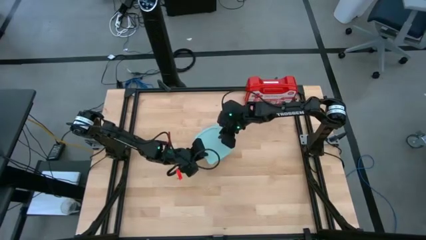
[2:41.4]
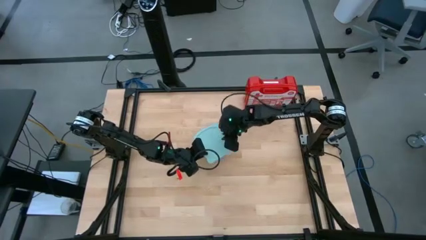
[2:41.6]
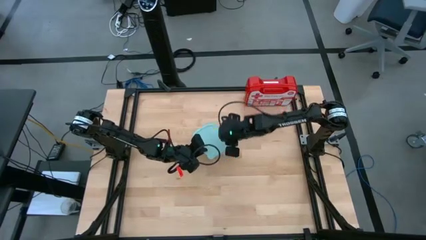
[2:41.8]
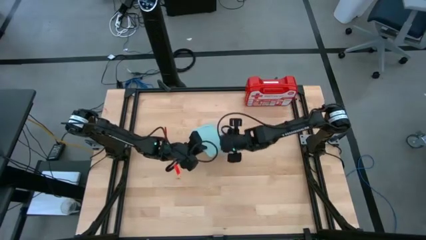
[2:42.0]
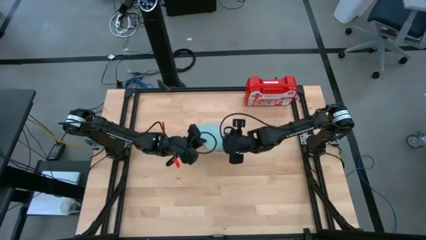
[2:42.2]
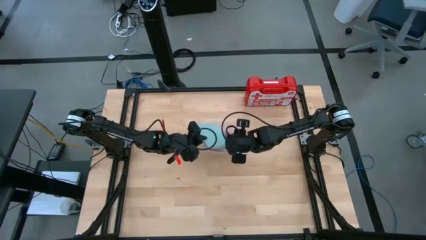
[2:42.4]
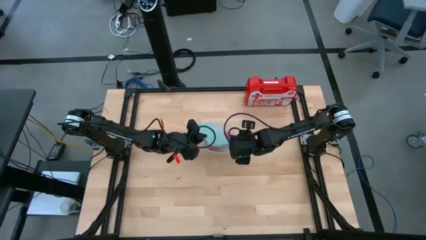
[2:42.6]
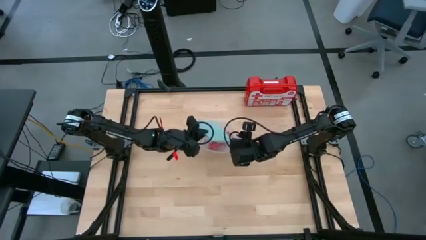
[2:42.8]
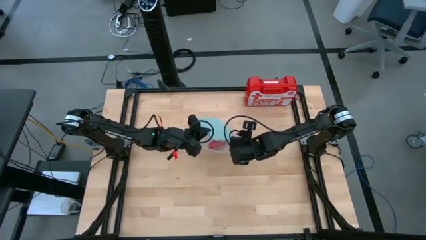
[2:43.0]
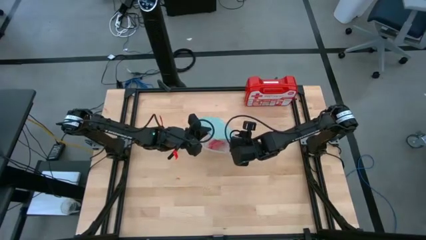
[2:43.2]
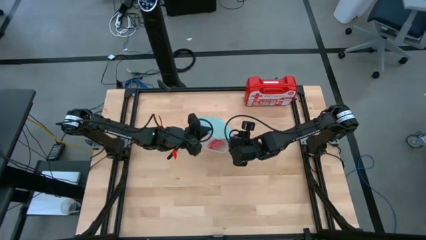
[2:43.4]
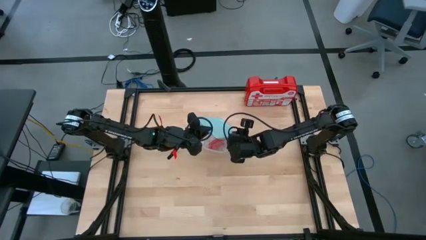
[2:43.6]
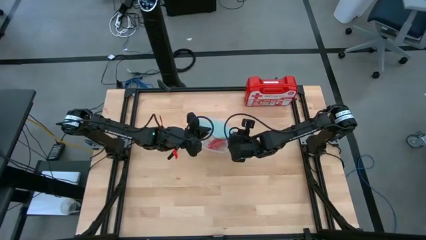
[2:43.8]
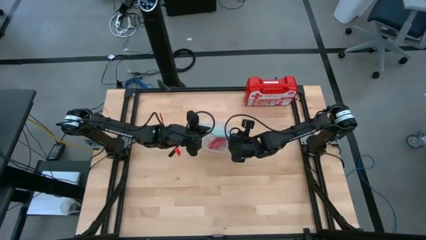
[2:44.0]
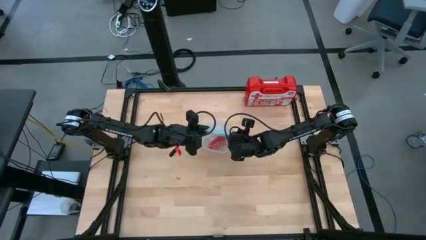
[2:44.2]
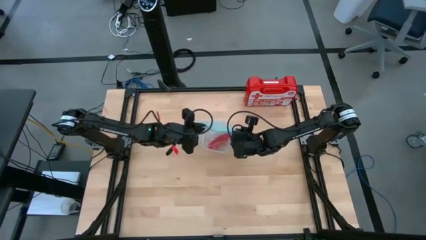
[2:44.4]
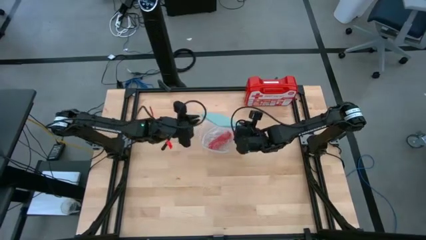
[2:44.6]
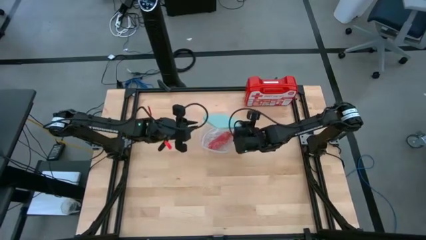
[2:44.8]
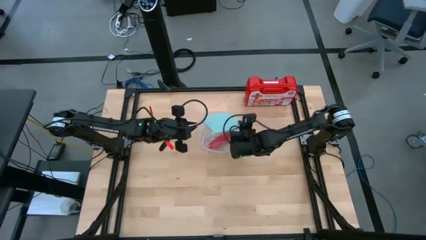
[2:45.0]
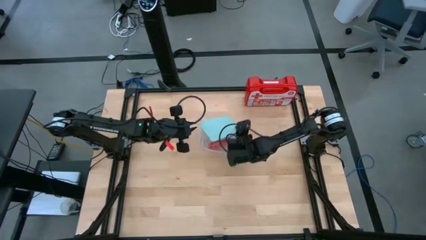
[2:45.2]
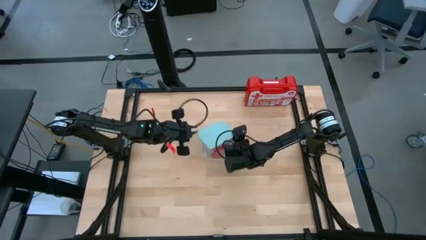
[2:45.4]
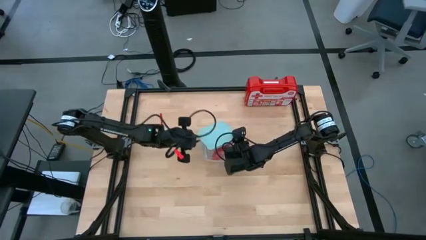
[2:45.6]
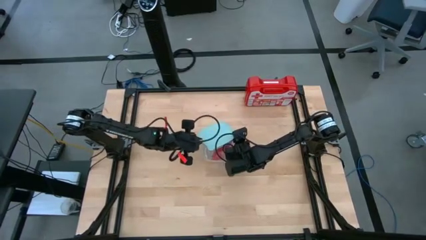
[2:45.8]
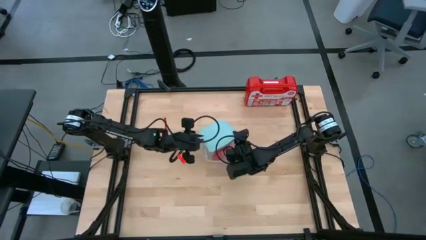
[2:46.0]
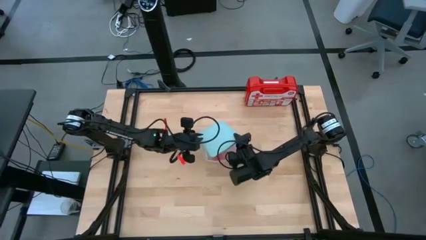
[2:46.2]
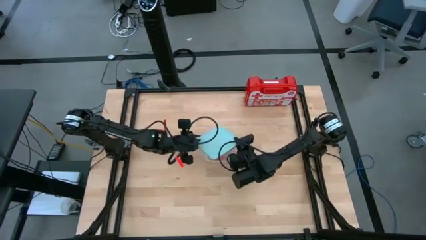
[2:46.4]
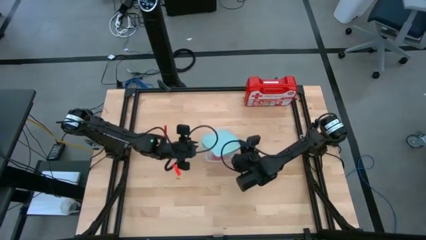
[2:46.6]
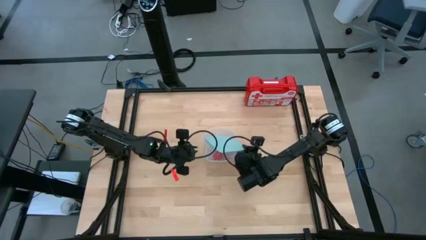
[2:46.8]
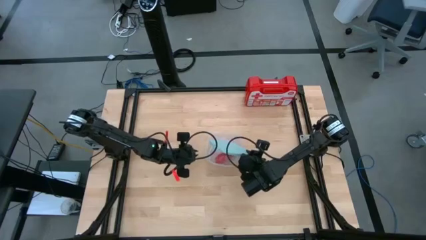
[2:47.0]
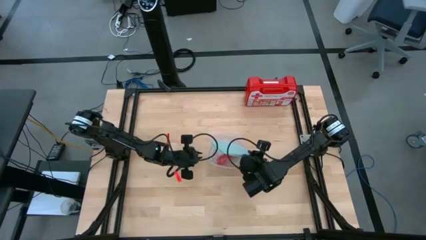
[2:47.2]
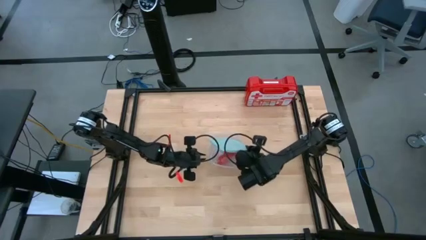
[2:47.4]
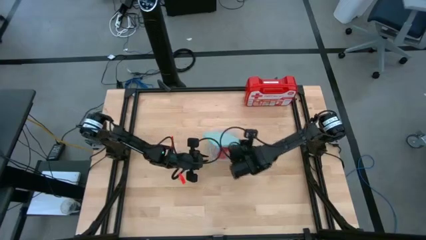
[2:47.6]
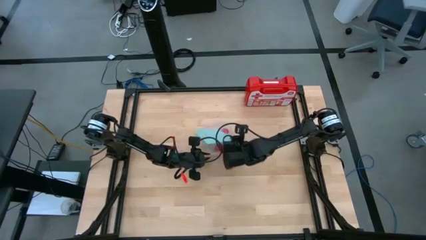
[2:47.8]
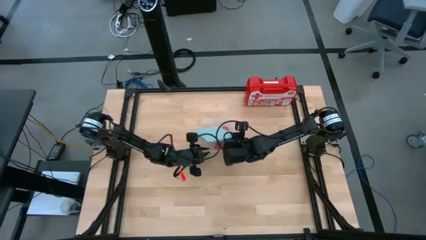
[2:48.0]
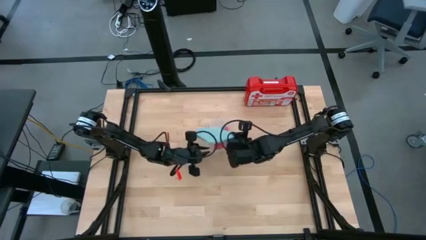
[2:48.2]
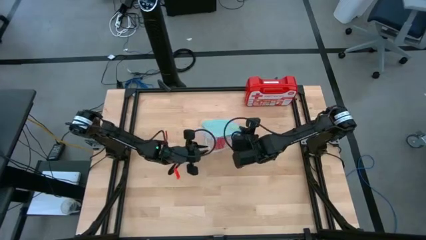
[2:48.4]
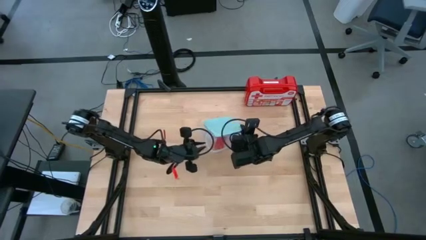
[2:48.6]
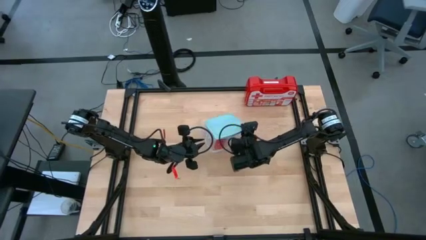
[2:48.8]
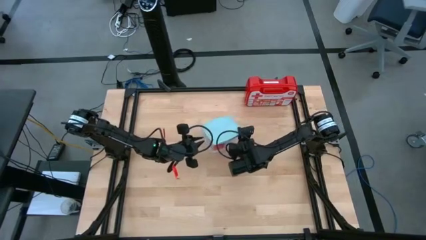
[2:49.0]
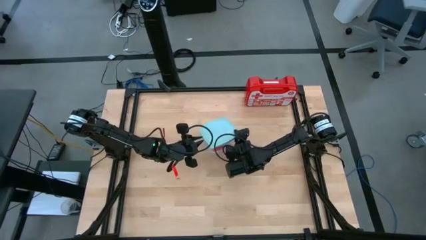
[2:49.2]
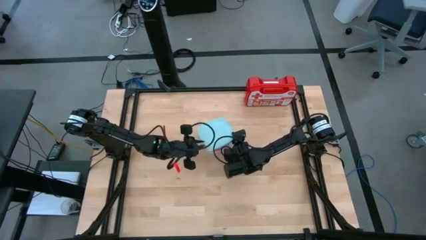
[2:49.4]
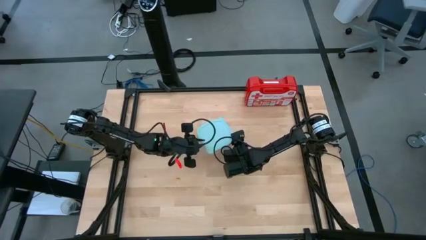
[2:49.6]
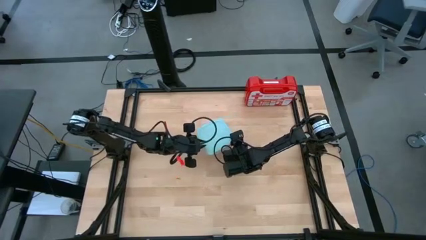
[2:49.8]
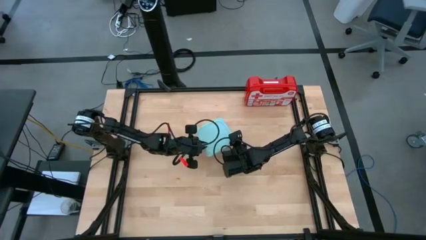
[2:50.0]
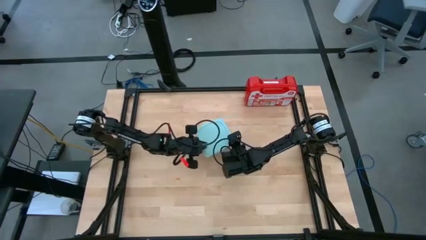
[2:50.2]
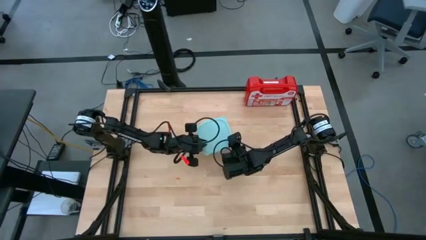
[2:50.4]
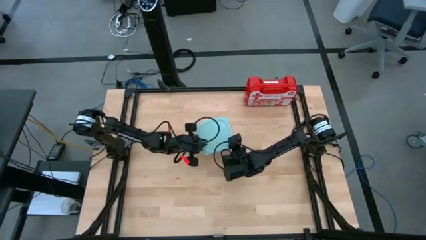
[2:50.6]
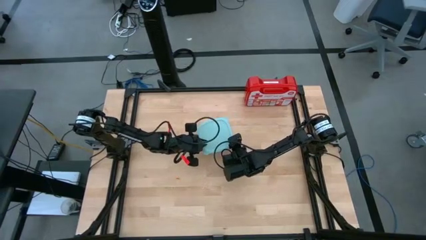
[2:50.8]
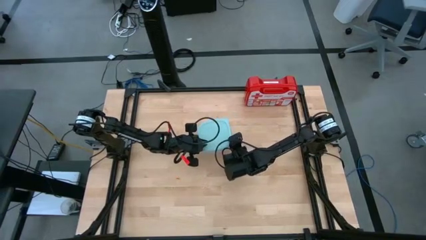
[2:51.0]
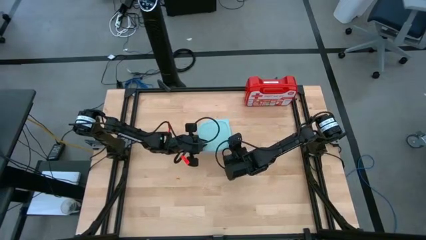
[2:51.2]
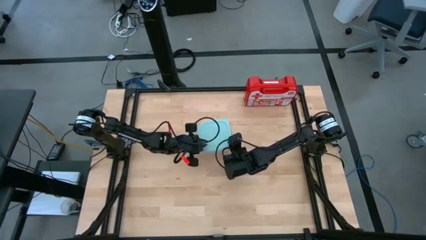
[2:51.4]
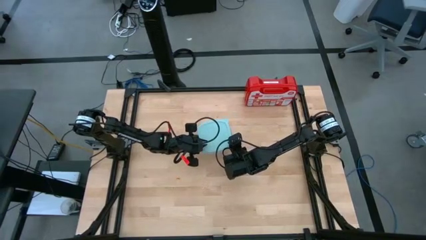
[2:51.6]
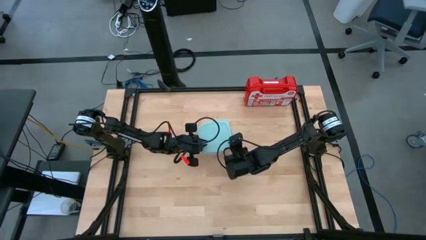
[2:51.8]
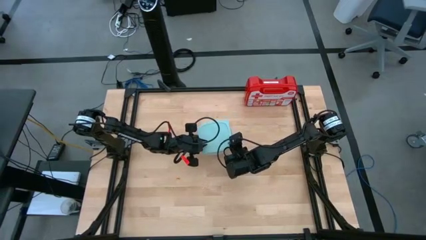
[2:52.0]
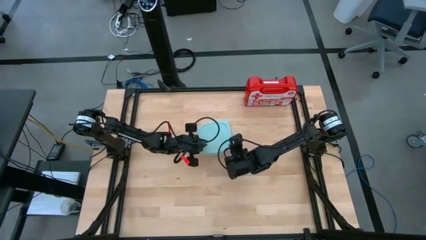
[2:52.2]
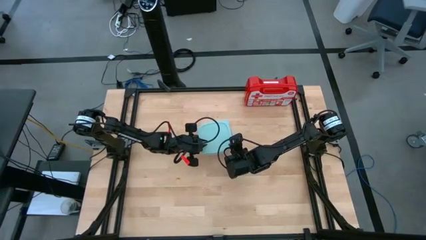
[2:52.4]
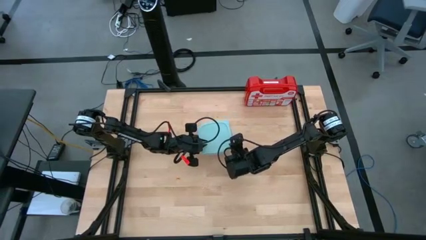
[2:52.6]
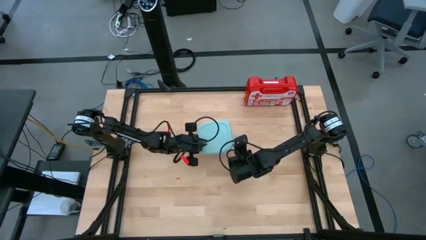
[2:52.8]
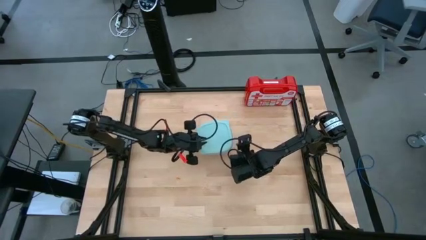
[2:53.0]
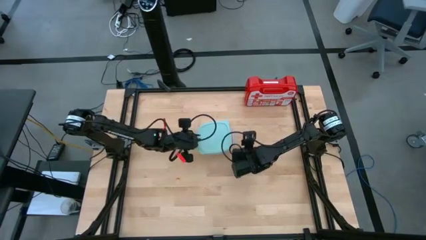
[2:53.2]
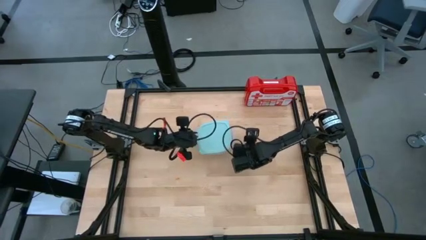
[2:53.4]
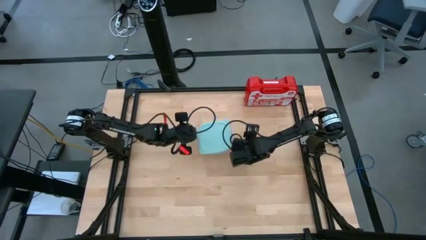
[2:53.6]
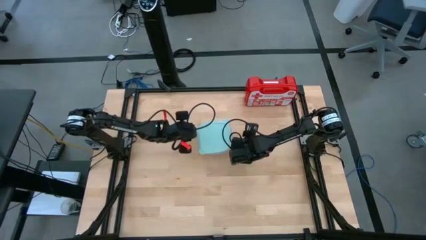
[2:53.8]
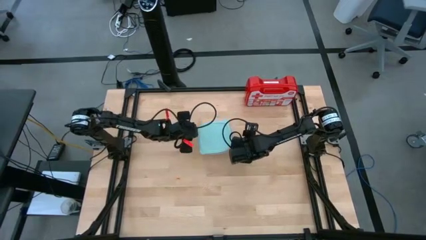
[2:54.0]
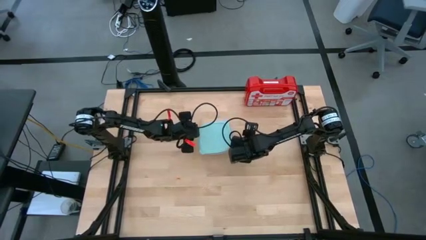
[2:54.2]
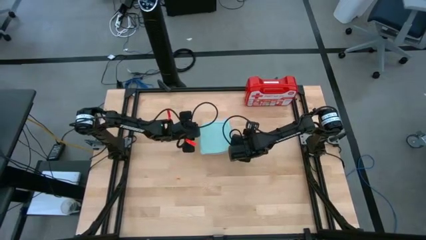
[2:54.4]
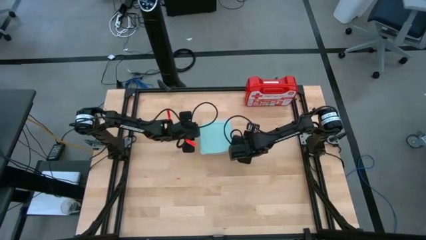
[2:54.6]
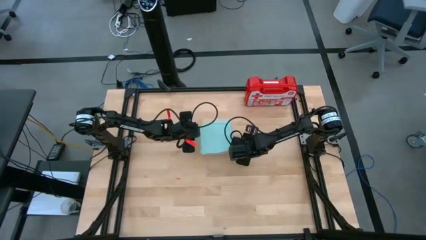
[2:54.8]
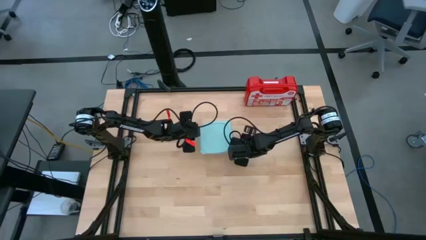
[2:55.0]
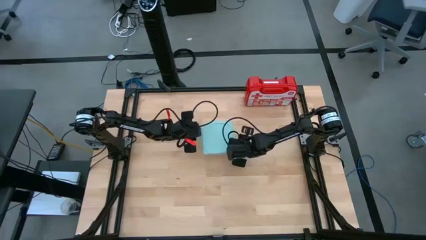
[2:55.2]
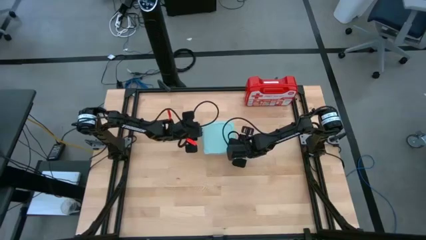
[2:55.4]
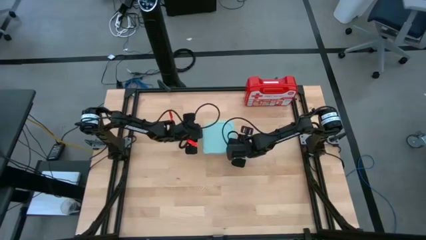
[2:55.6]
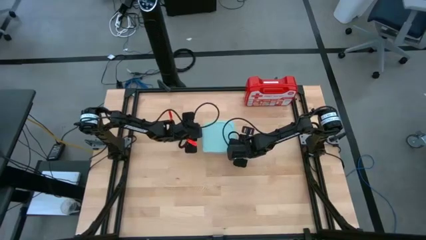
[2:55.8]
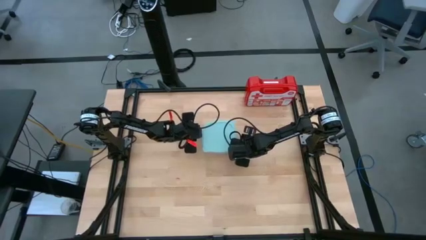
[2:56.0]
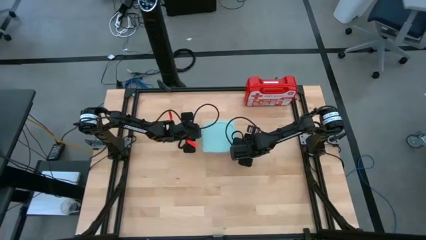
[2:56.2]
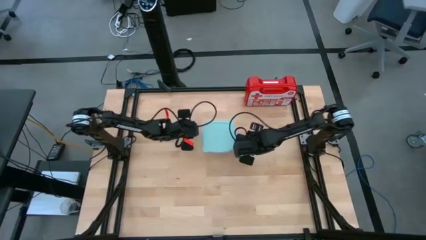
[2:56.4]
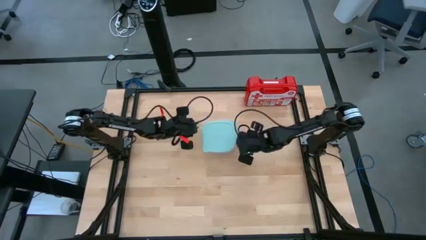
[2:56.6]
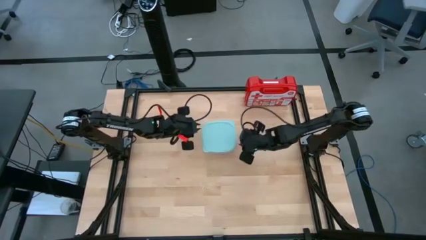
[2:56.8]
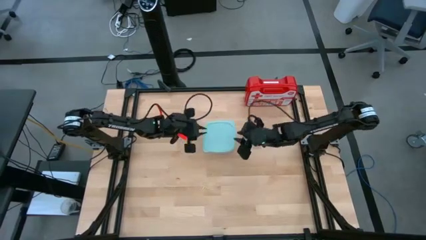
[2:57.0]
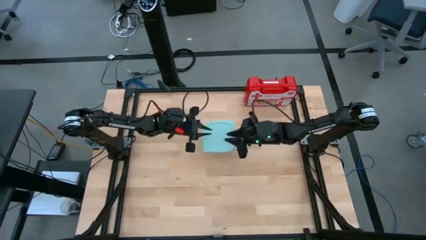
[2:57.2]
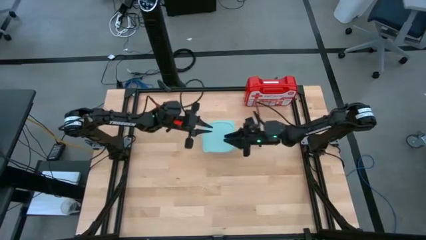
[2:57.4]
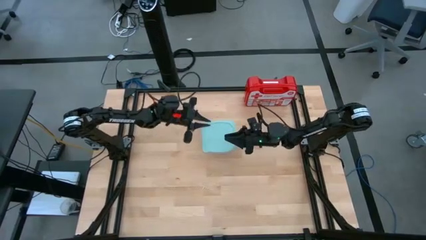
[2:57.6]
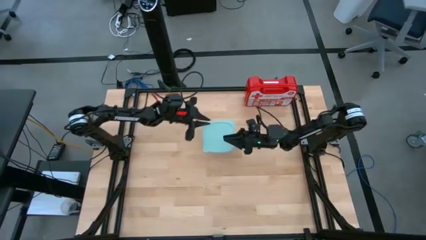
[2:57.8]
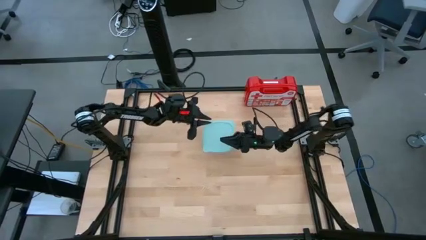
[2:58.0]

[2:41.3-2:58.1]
Task: Roll bandage
Close the plastic container
